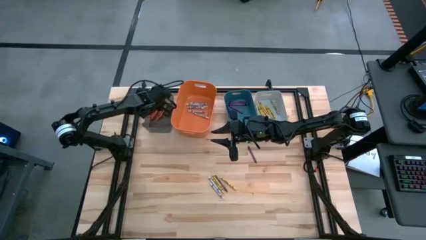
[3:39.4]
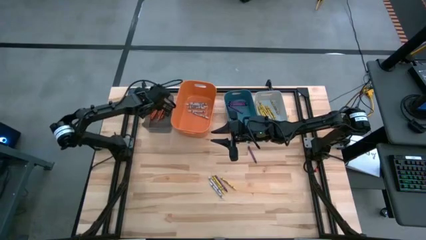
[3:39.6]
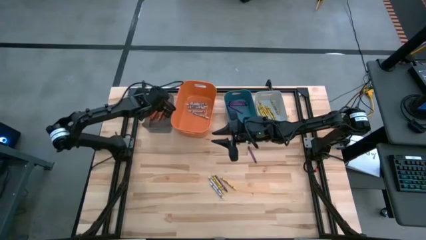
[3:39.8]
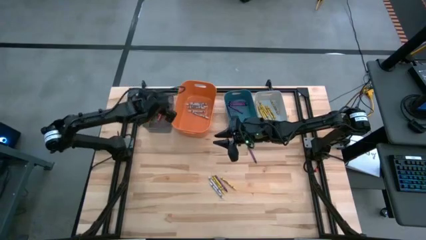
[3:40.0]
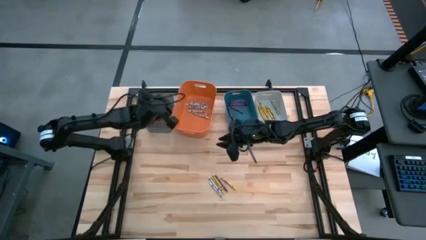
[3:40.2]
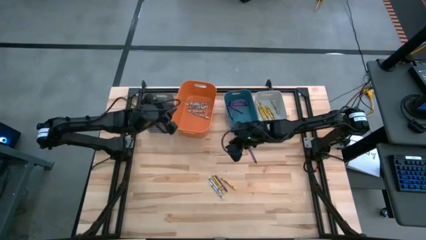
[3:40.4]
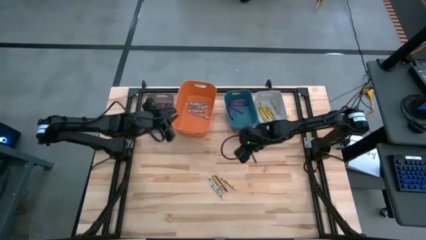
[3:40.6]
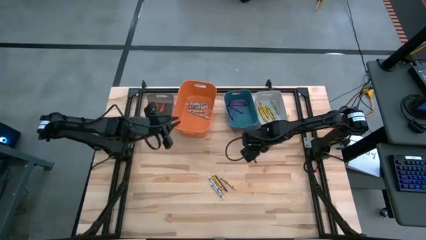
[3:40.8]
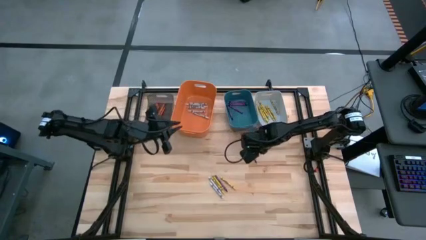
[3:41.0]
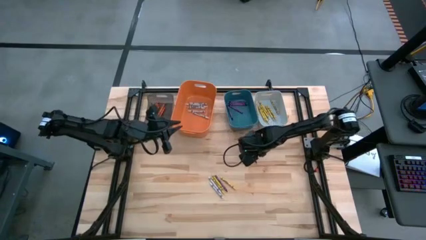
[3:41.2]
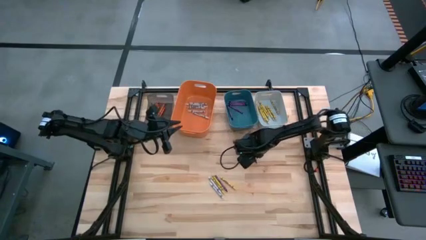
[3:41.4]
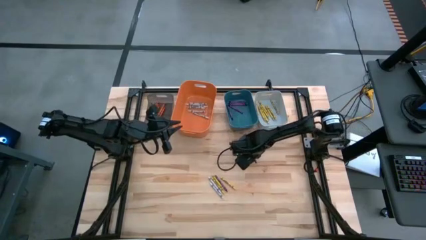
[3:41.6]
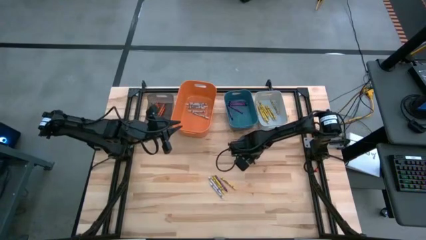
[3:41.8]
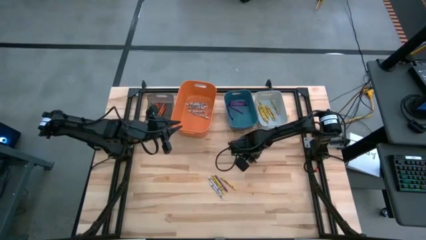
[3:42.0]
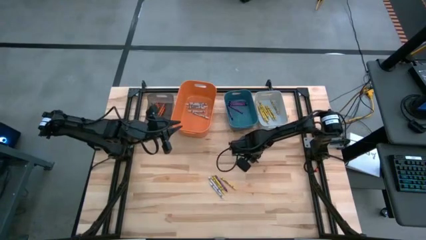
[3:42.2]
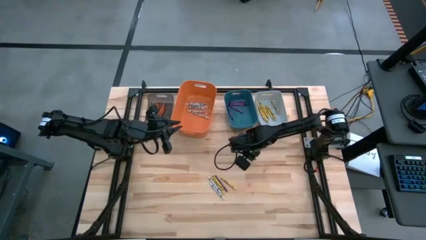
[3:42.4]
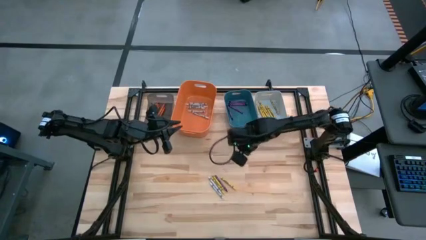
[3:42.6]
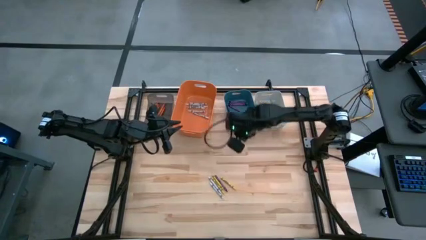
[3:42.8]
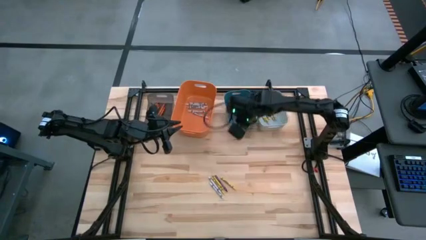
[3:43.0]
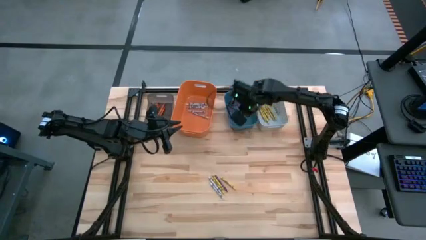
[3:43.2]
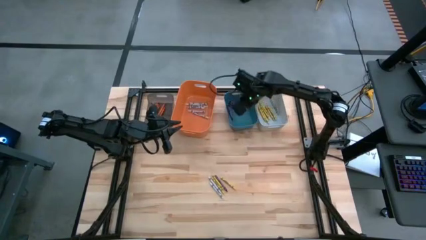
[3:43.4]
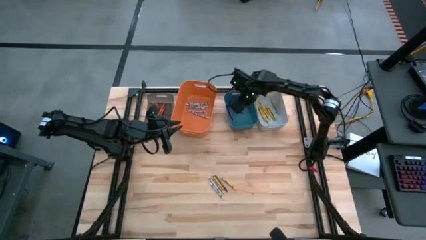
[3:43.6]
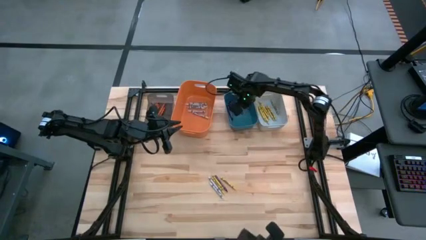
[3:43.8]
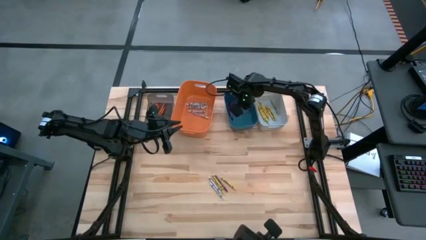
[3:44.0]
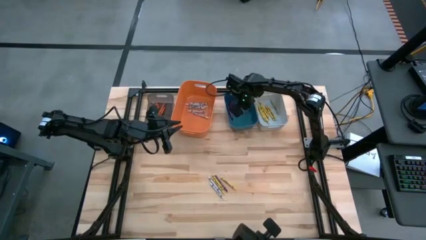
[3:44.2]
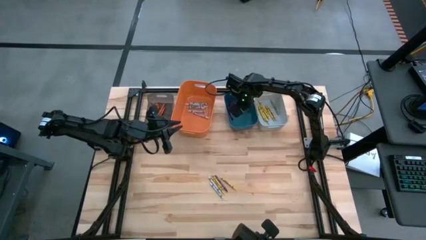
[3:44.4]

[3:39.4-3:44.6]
Task: Sort crayons
Put the purple crayon into the blue bin

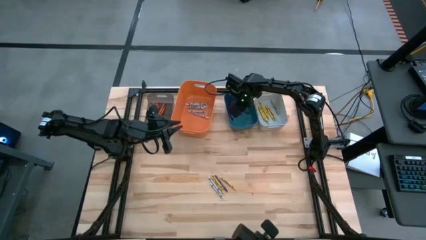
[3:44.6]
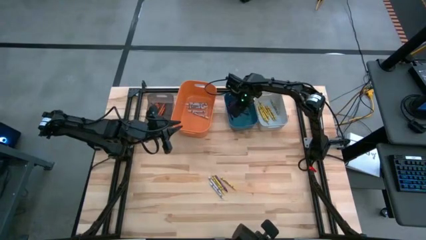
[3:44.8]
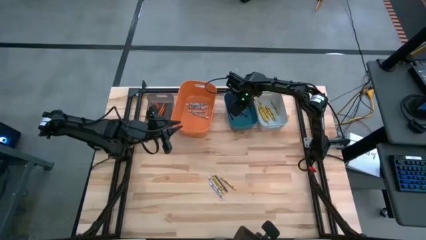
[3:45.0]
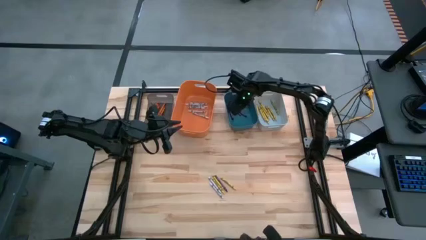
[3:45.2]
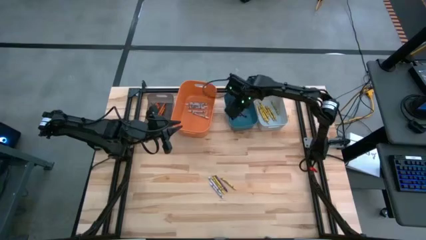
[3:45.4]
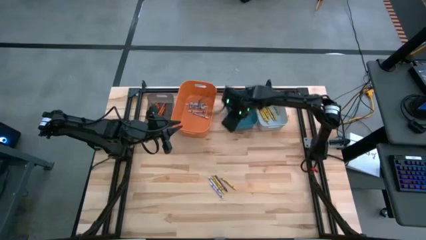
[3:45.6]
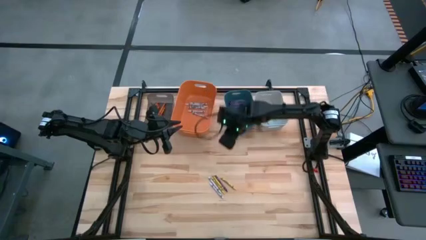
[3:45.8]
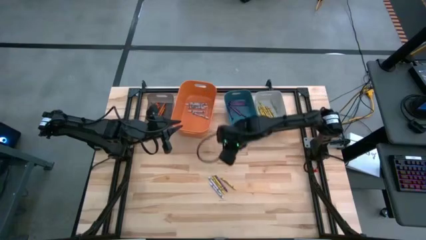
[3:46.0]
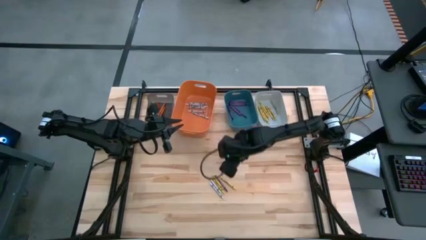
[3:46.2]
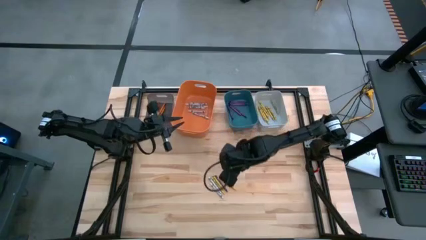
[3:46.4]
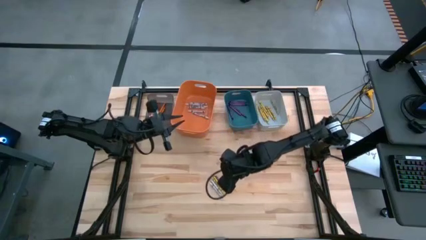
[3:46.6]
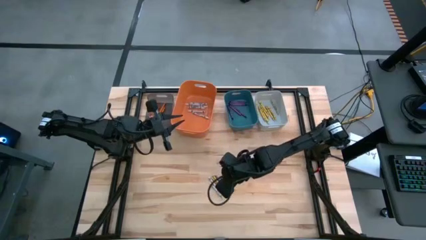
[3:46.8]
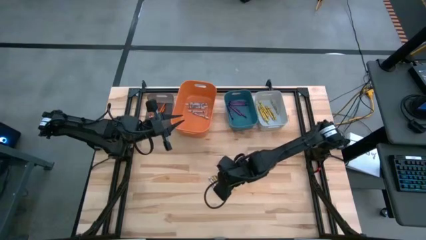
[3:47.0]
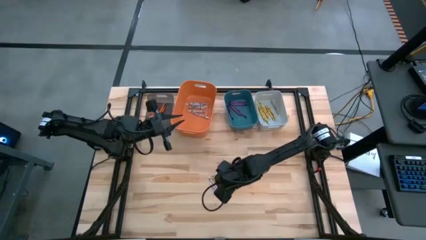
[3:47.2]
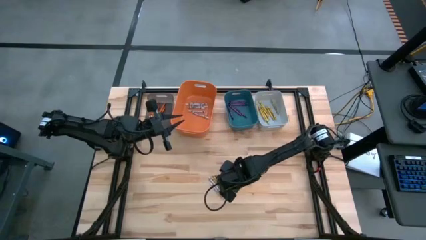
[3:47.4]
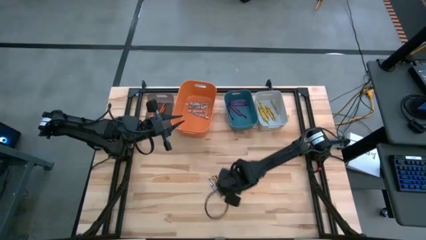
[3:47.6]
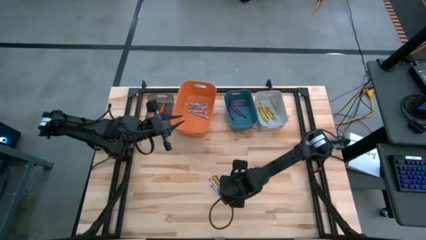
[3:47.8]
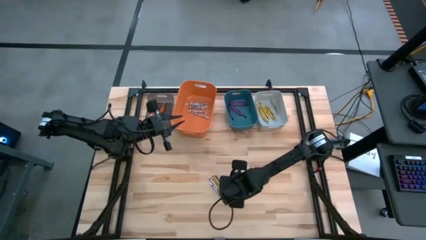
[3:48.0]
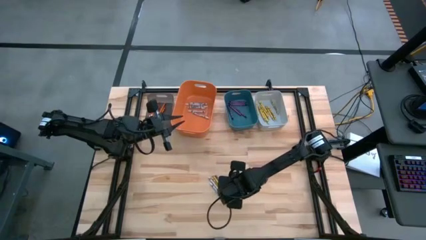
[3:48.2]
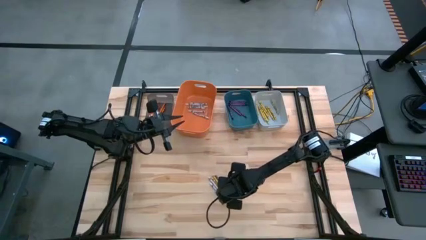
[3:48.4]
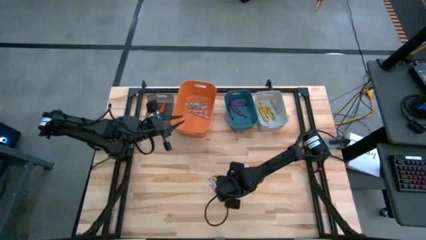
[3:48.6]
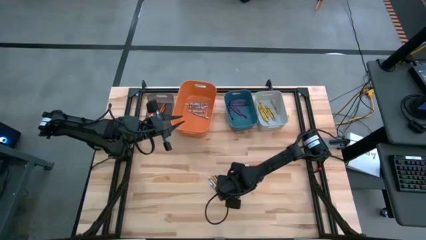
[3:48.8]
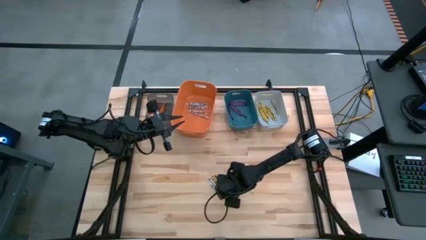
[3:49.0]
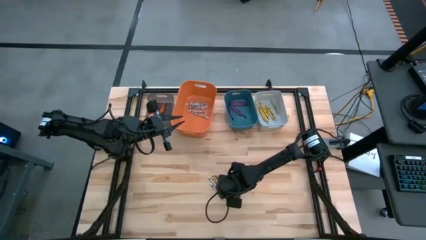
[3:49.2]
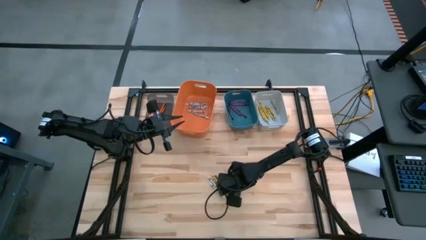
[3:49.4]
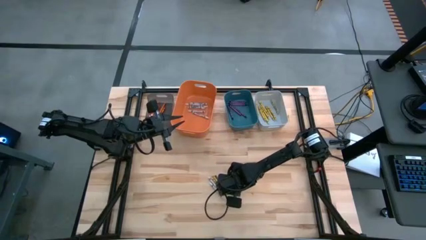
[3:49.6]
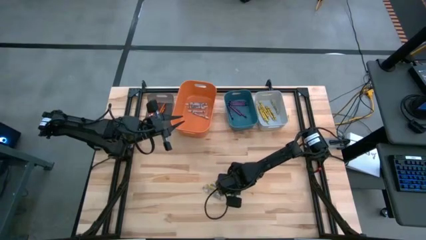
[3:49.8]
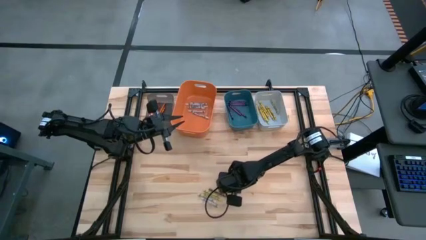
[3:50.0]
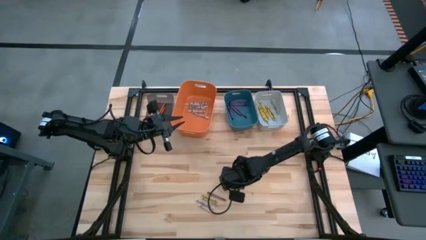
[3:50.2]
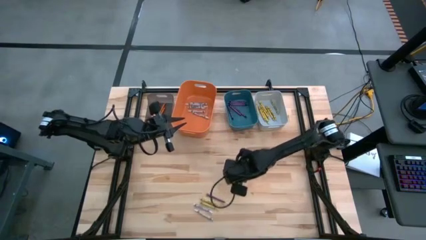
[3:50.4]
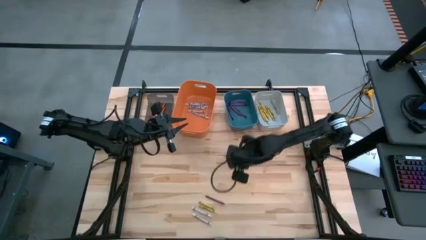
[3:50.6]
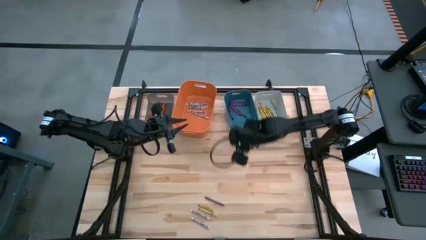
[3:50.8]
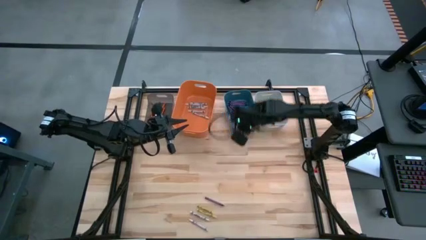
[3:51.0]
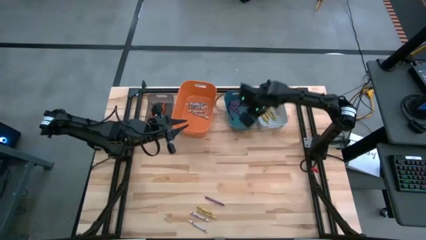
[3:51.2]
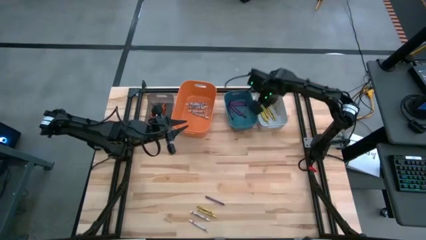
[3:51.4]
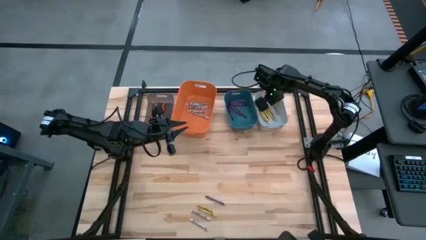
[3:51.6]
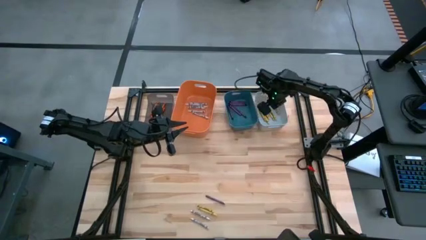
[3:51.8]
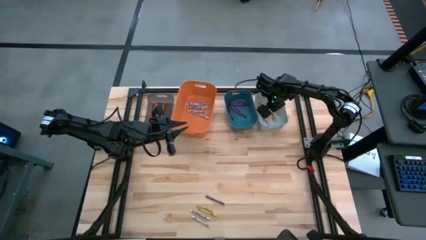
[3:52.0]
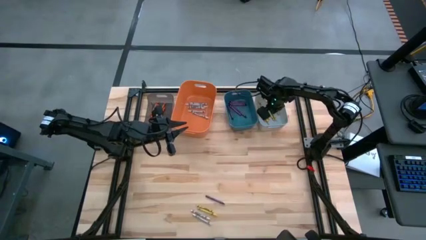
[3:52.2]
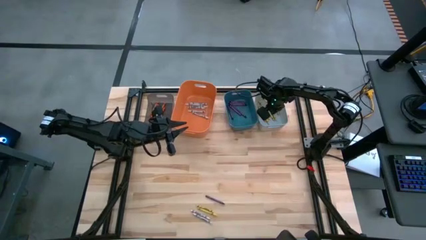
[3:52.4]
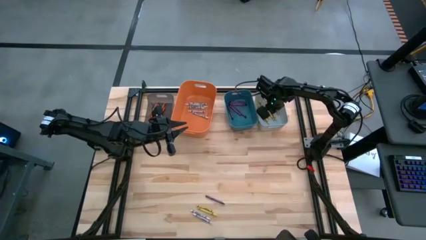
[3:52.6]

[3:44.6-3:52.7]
Put the yellow crayon into the white bin
